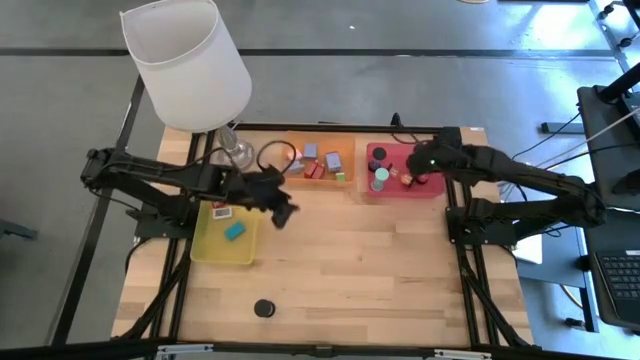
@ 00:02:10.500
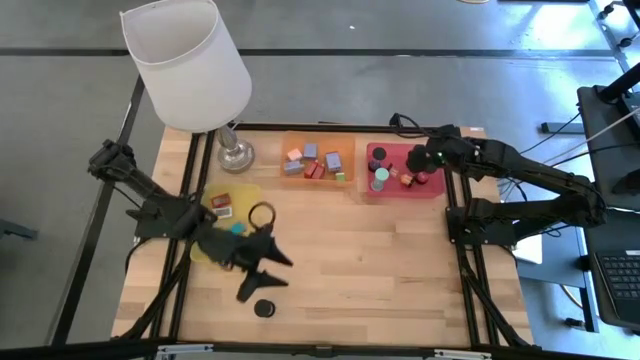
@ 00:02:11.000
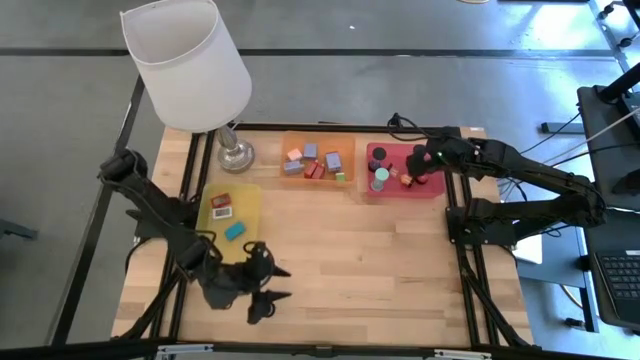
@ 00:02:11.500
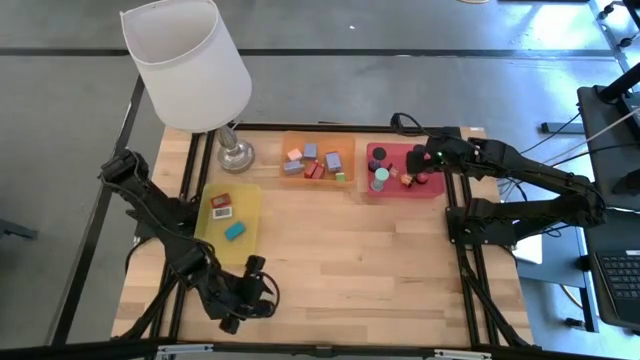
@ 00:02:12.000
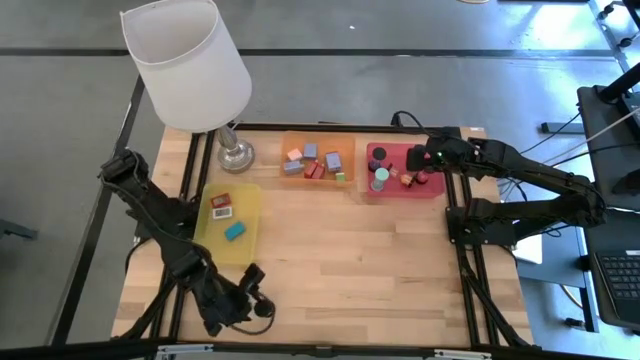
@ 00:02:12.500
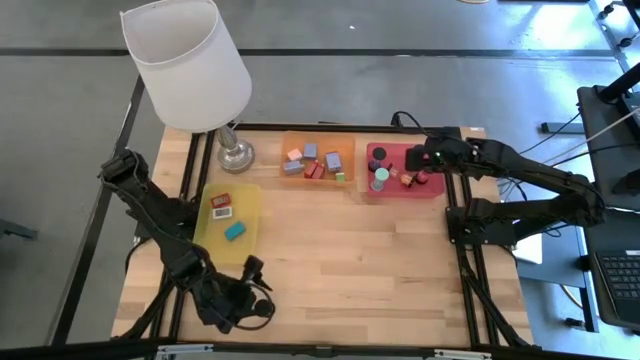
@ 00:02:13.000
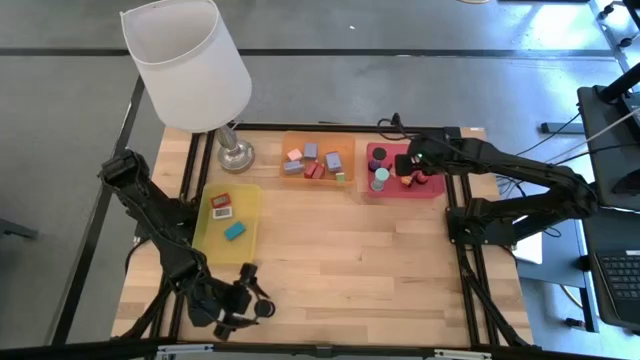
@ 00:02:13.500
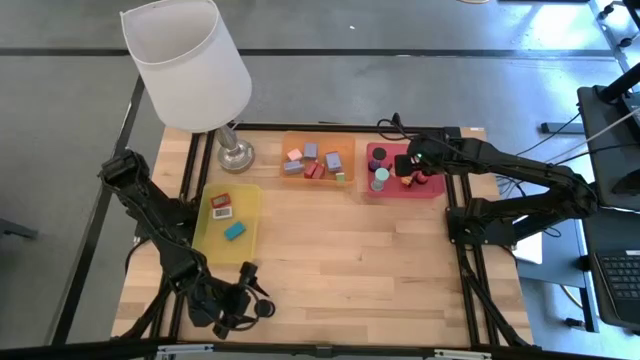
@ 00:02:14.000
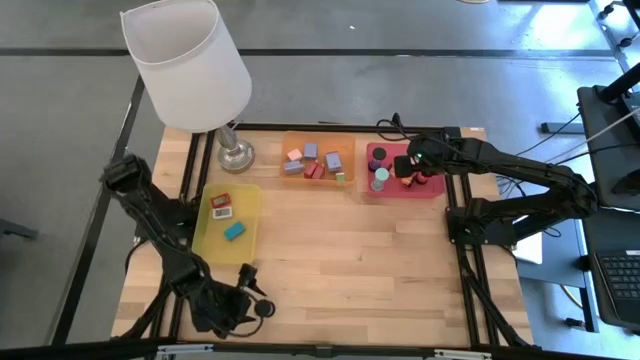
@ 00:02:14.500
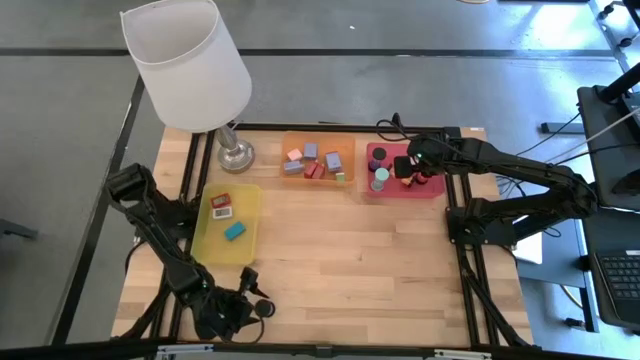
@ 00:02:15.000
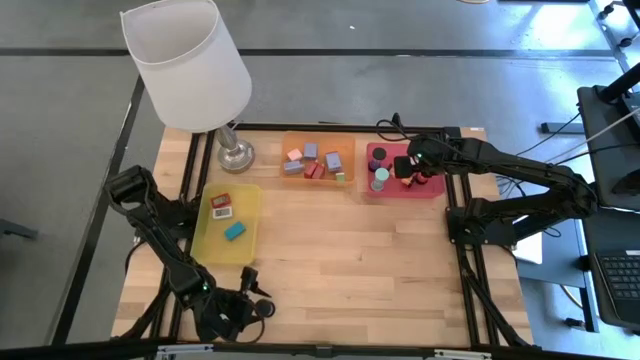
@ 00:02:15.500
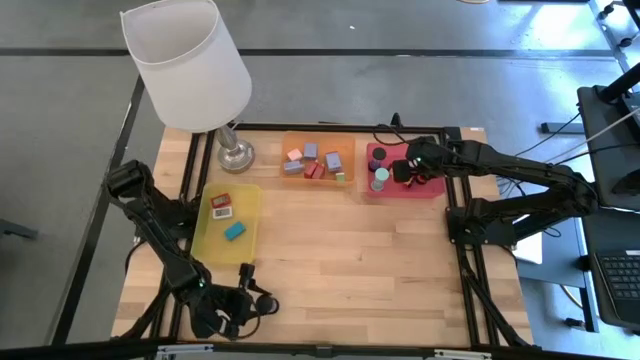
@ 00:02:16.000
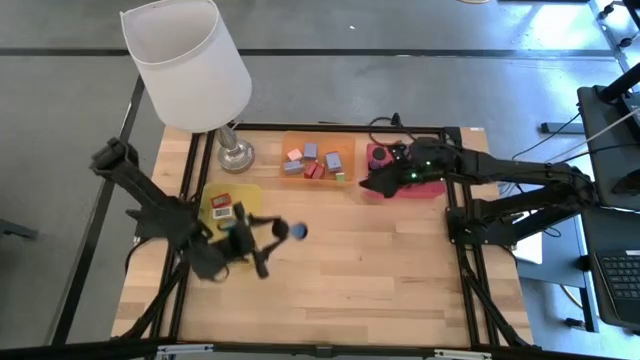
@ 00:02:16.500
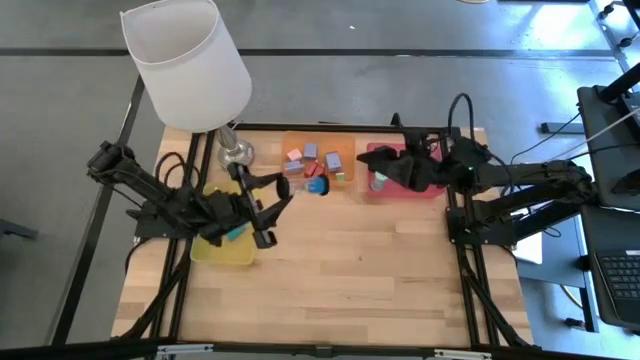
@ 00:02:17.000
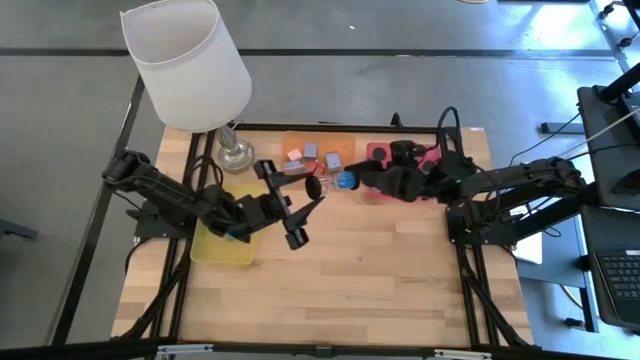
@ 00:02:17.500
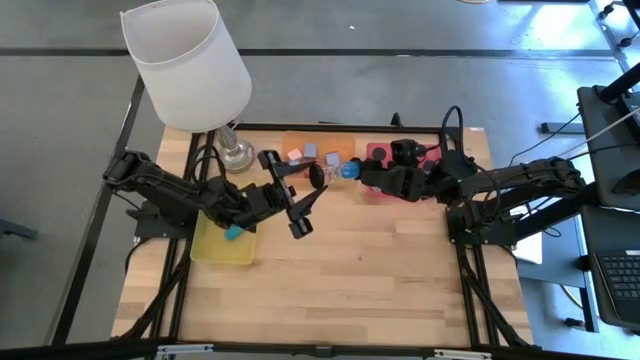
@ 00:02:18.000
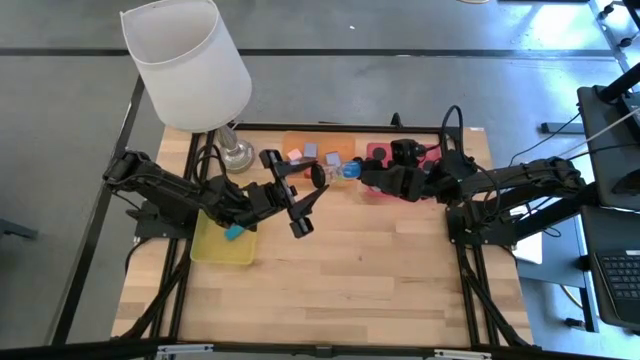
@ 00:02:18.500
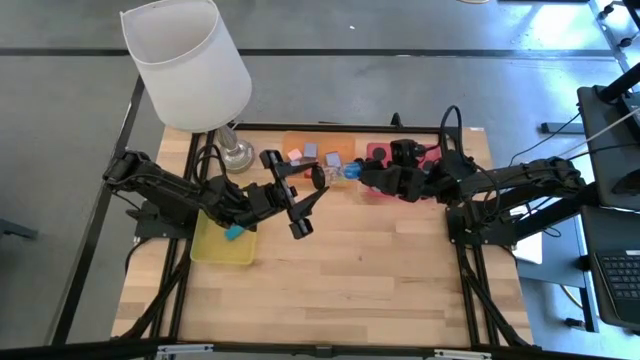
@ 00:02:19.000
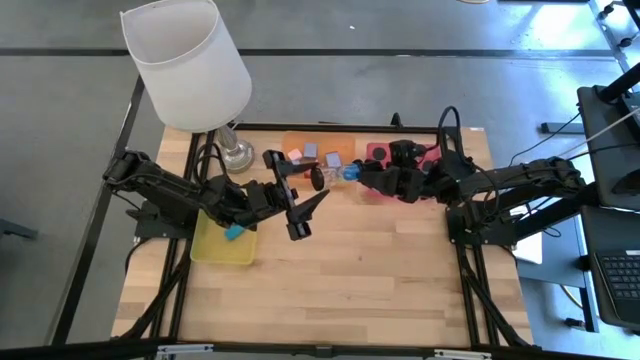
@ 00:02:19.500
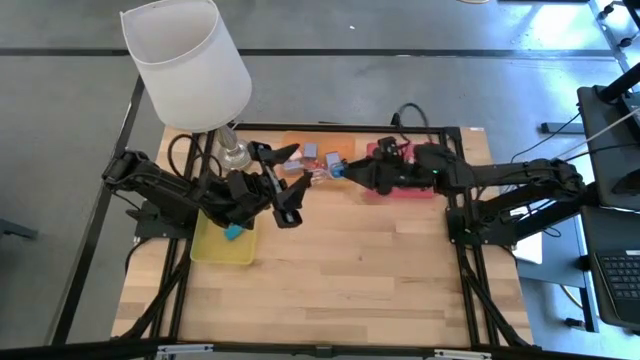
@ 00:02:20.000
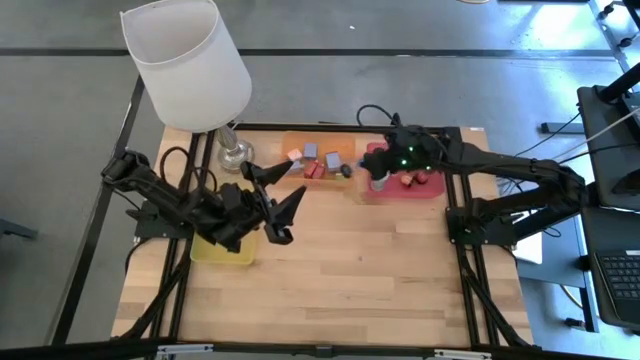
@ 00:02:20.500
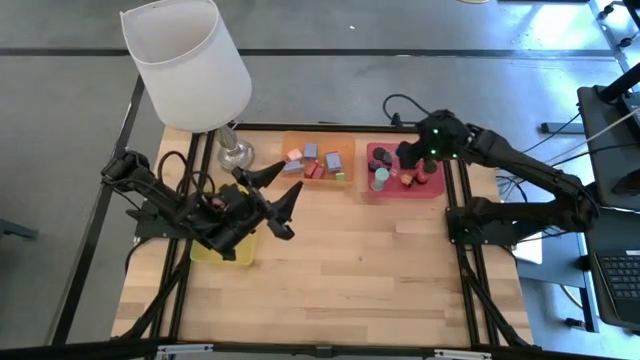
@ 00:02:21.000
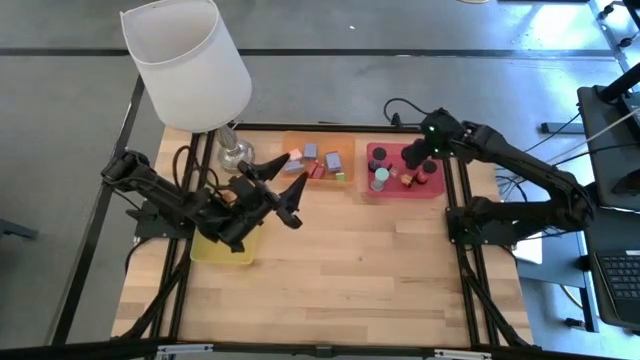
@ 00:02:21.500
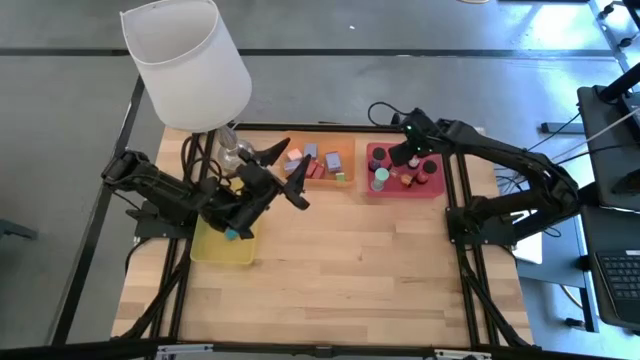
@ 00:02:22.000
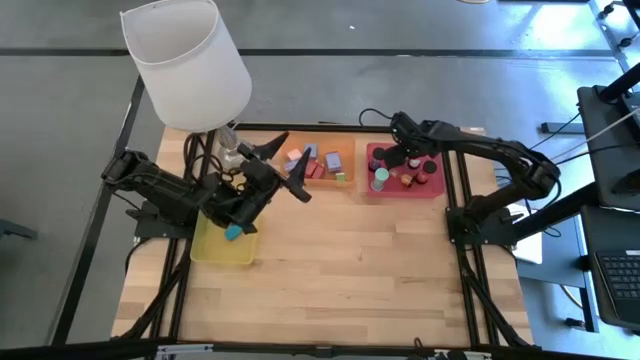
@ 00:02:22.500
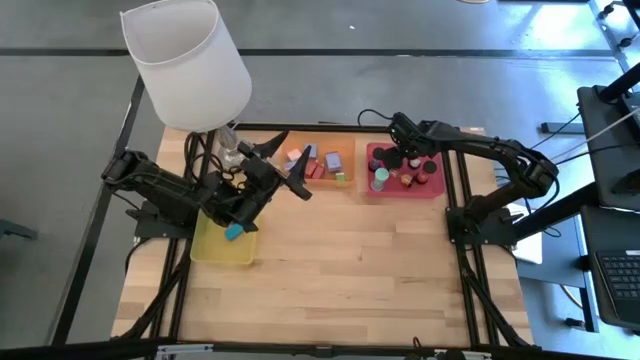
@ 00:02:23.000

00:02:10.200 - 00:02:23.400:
Task: Pick & Place Office items
Put the blue hourglass into the pink bin

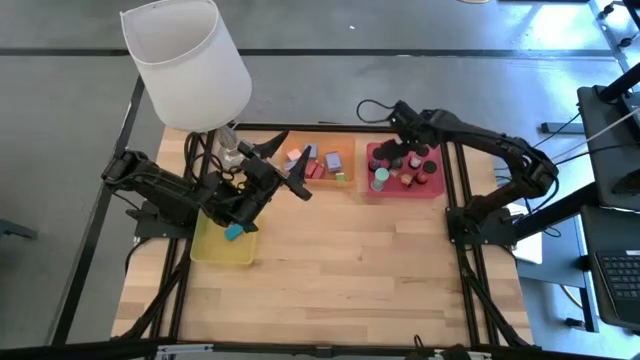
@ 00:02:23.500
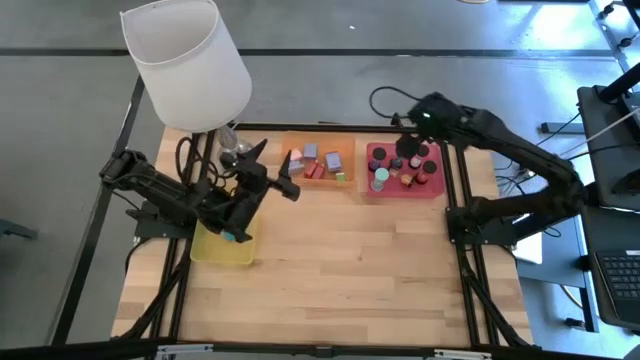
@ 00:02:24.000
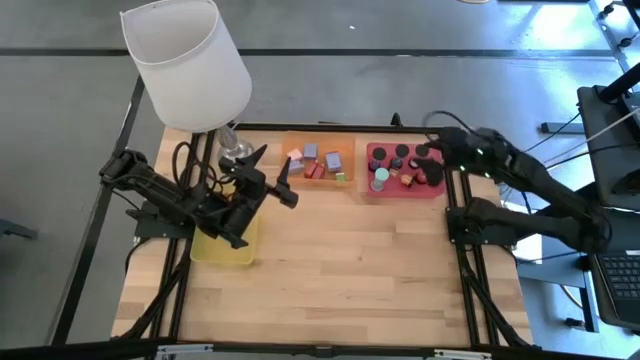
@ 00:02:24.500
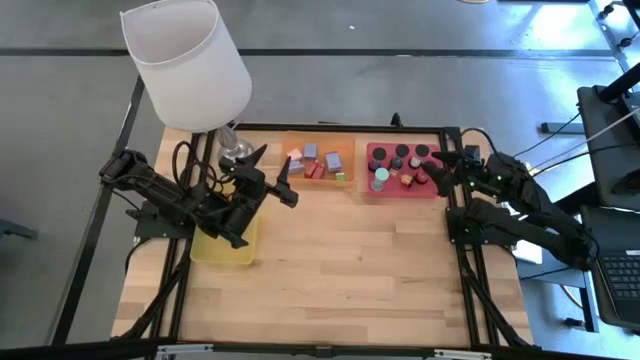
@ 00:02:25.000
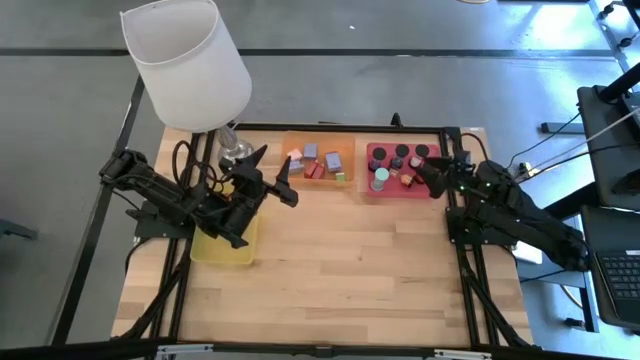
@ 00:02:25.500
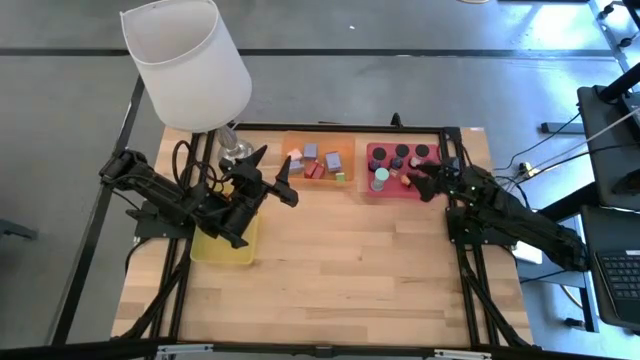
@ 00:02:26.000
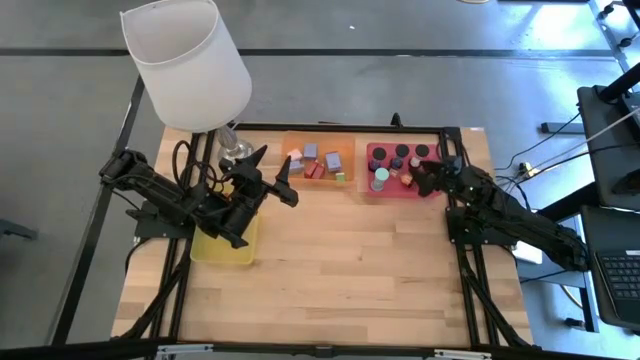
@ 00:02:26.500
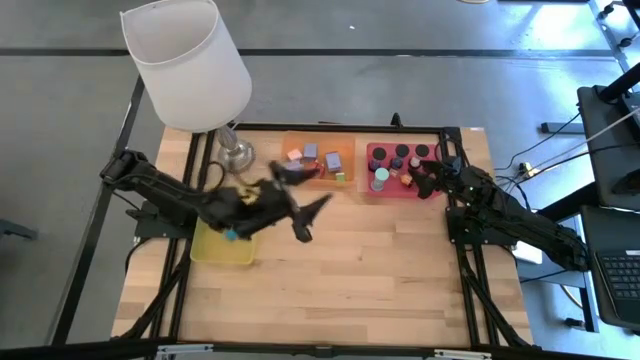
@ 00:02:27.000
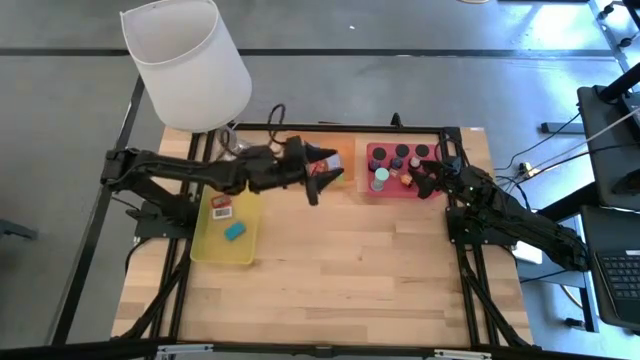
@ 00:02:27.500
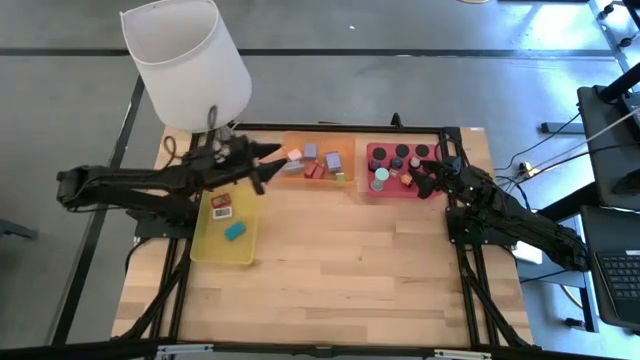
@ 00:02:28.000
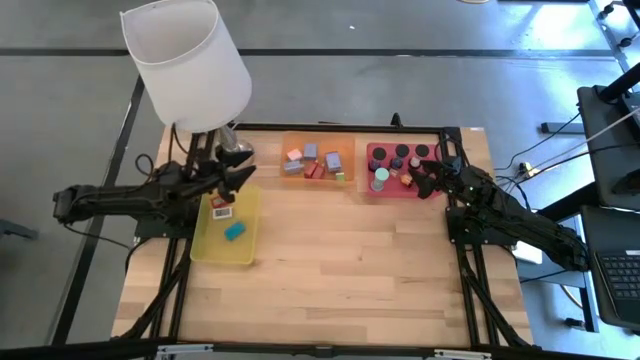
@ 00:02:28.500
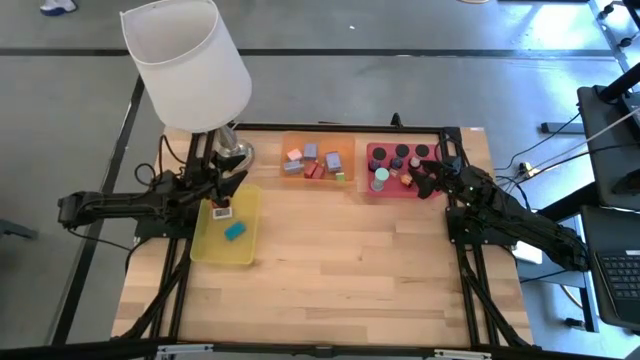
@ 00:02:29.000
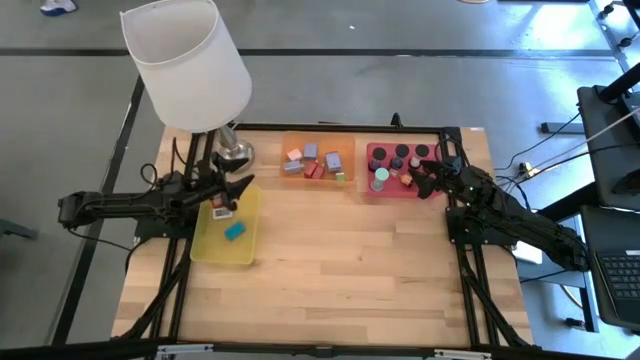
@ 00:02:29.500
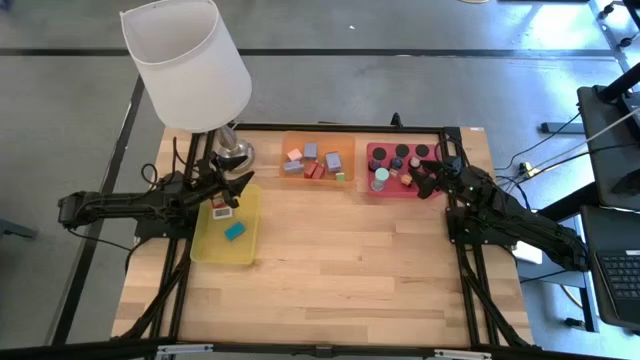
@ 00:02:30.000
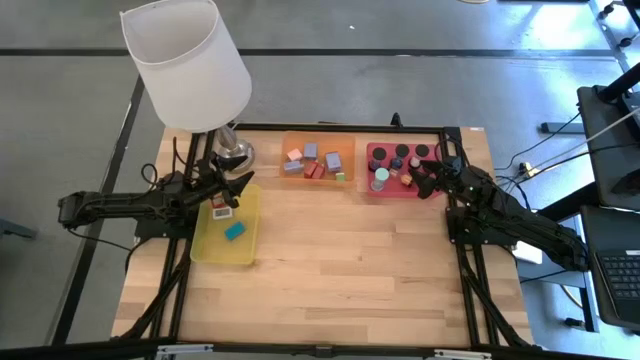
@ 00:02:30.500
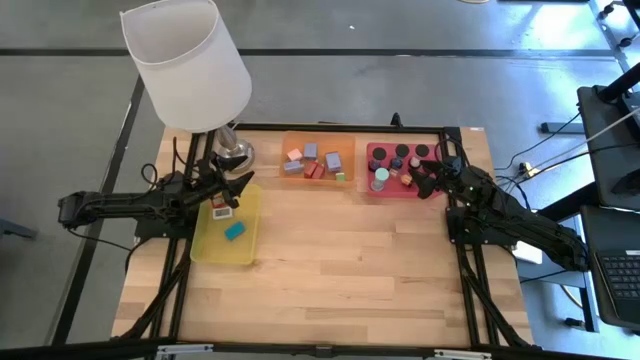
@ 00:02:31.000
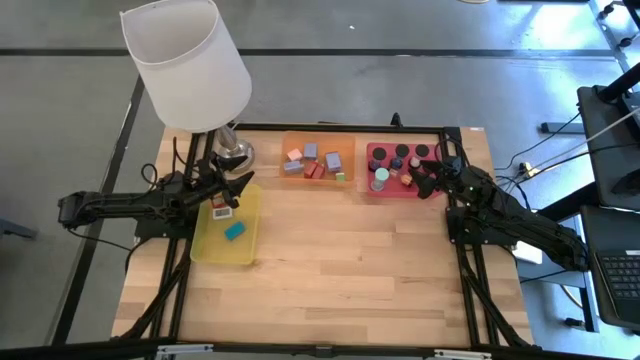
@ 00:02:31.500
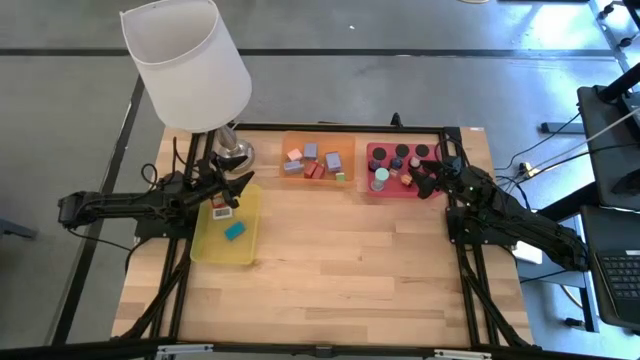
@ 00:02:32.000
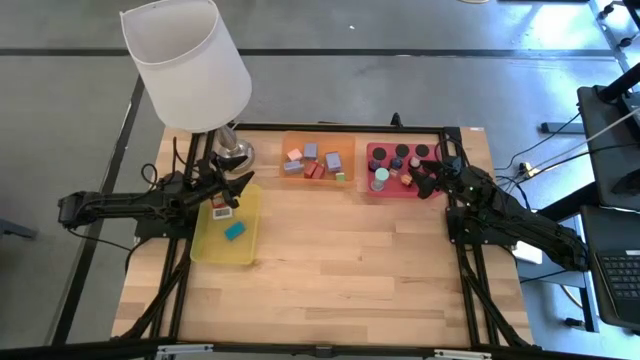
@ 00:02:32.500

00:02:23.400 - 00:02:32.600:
Return to Home Position
